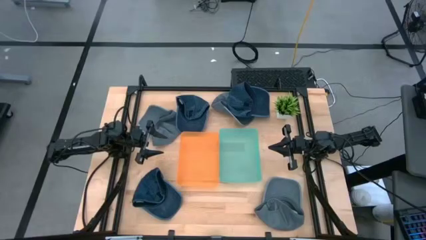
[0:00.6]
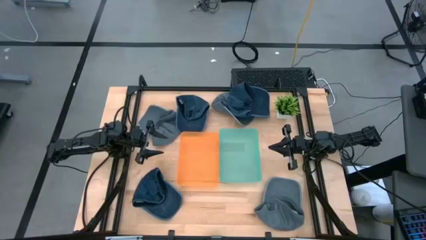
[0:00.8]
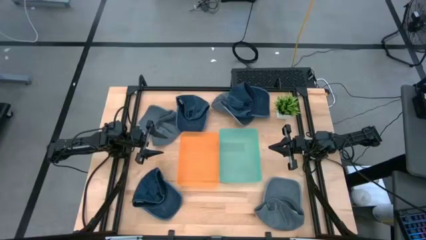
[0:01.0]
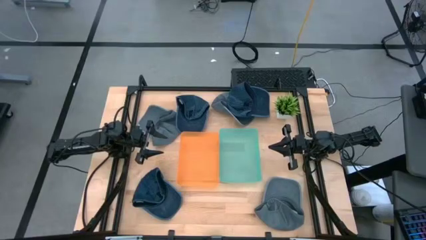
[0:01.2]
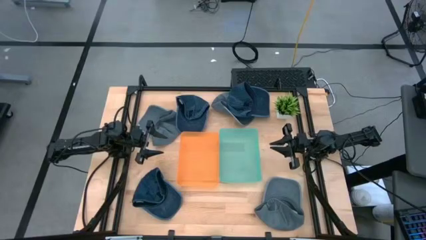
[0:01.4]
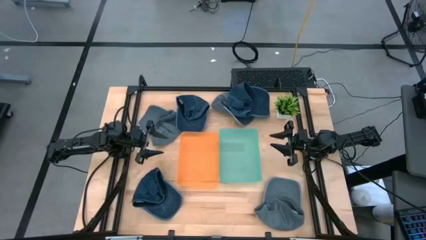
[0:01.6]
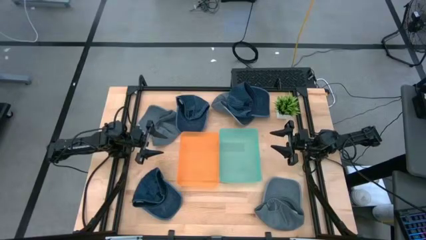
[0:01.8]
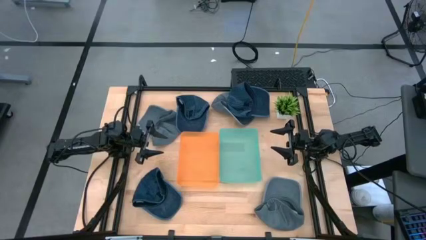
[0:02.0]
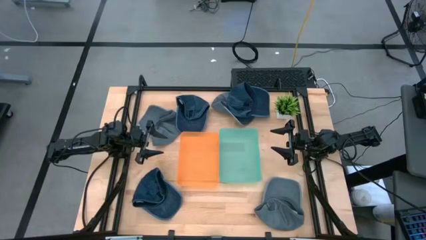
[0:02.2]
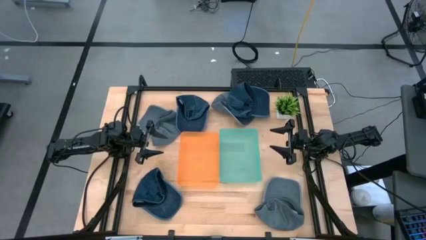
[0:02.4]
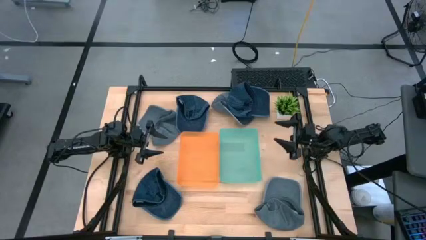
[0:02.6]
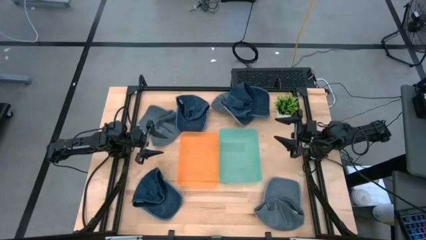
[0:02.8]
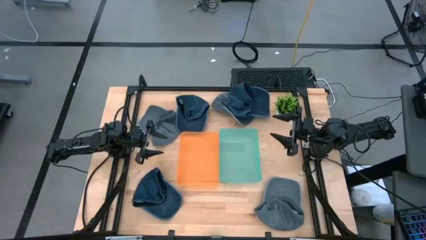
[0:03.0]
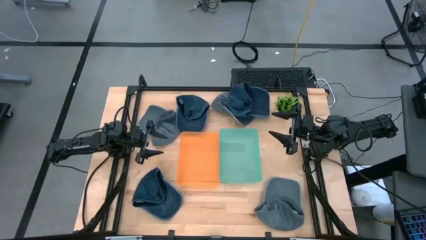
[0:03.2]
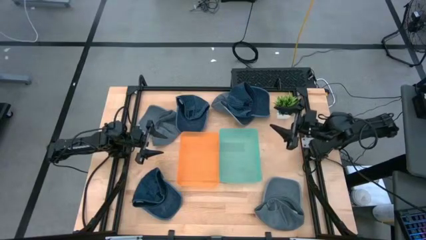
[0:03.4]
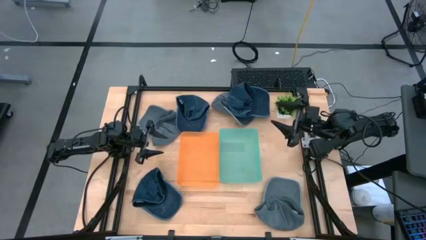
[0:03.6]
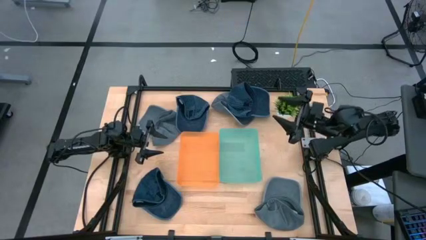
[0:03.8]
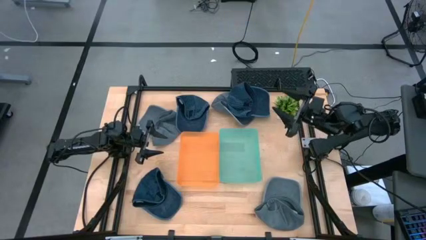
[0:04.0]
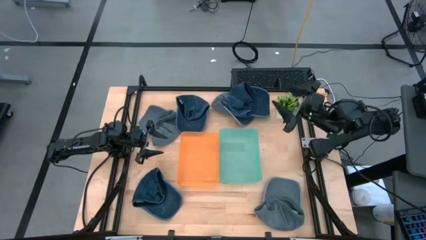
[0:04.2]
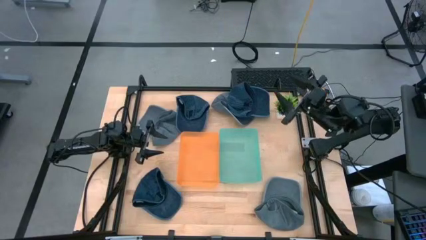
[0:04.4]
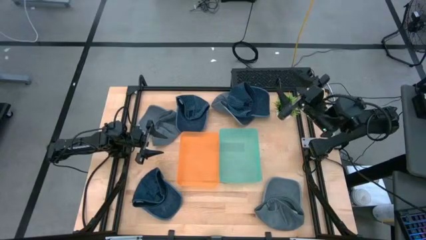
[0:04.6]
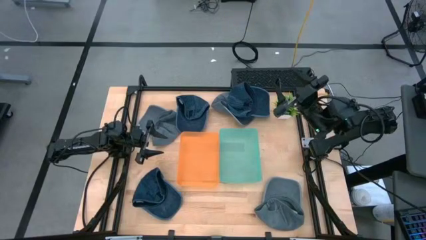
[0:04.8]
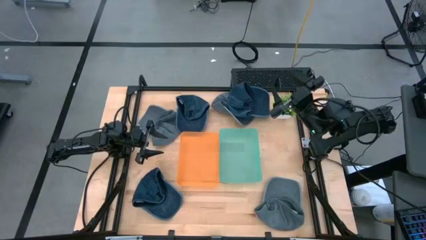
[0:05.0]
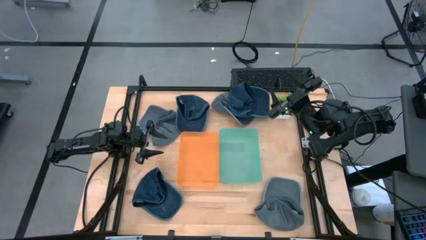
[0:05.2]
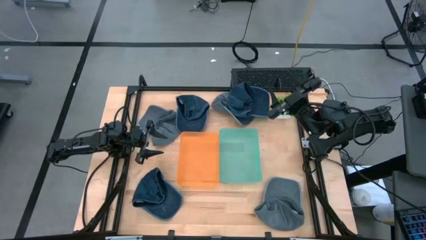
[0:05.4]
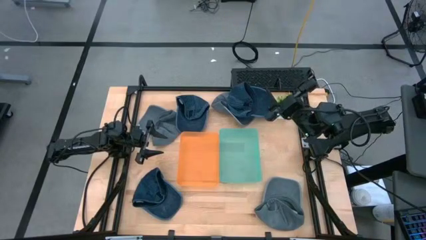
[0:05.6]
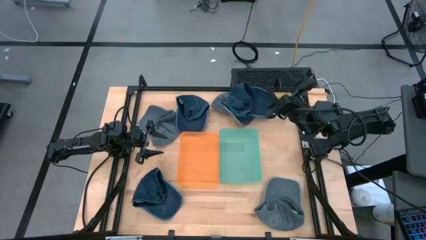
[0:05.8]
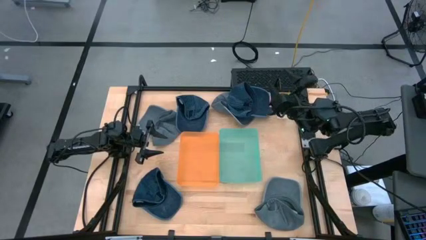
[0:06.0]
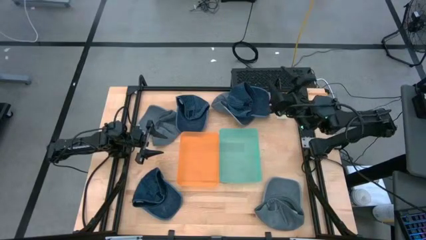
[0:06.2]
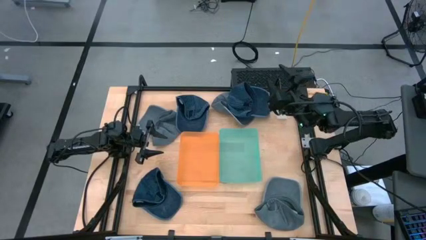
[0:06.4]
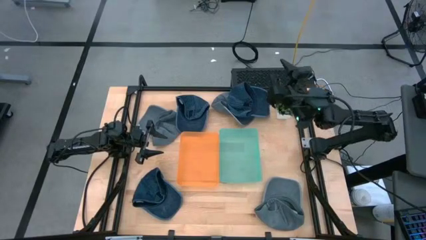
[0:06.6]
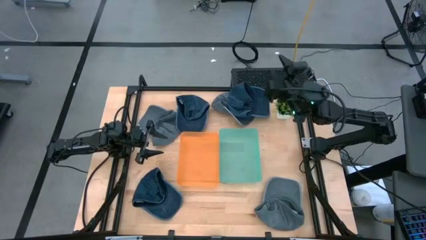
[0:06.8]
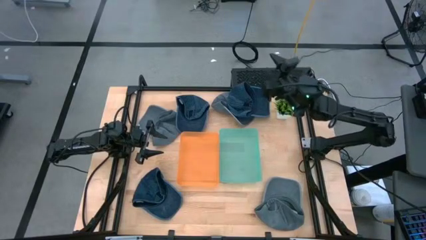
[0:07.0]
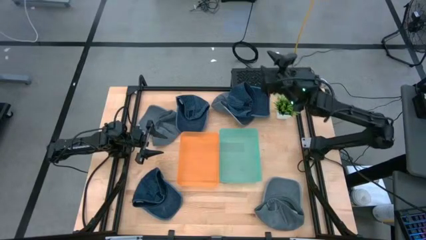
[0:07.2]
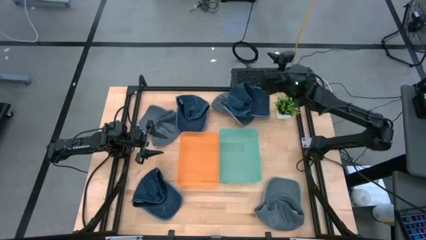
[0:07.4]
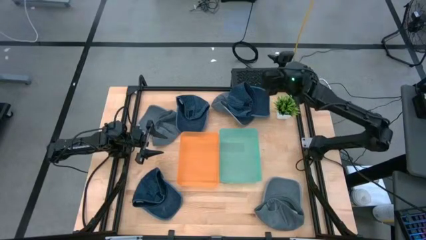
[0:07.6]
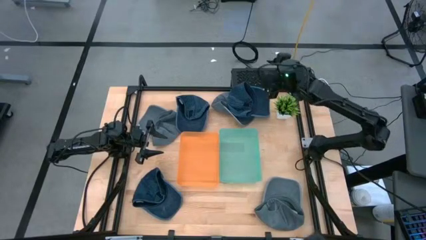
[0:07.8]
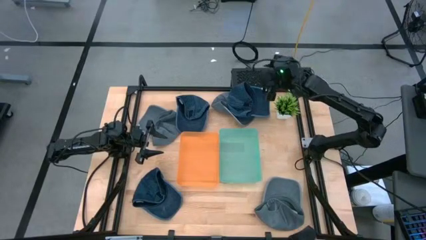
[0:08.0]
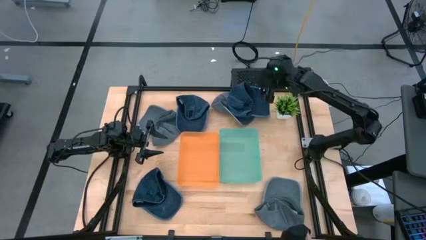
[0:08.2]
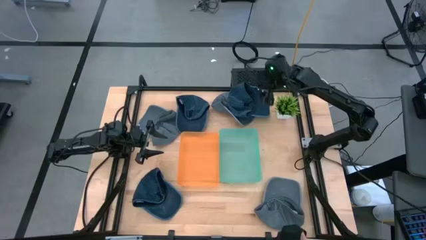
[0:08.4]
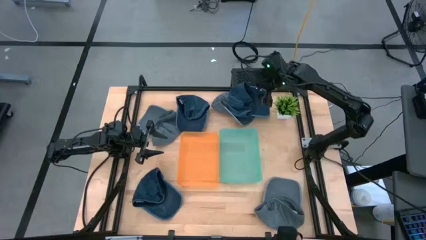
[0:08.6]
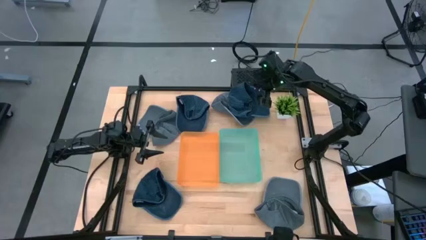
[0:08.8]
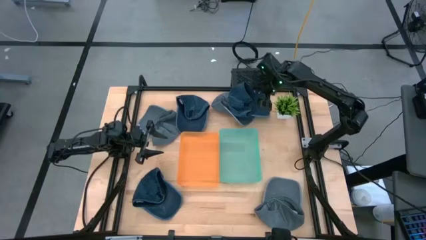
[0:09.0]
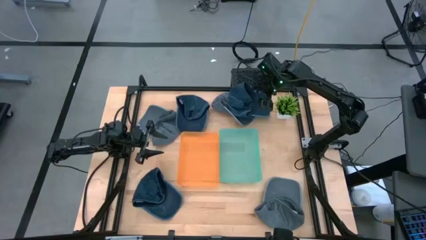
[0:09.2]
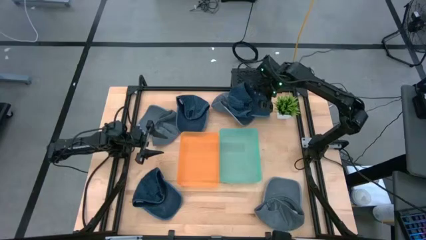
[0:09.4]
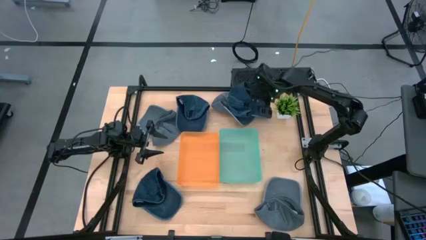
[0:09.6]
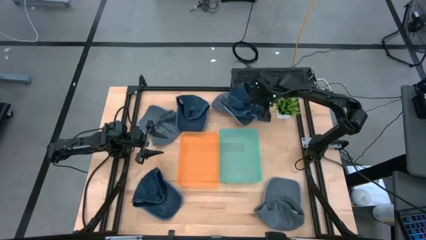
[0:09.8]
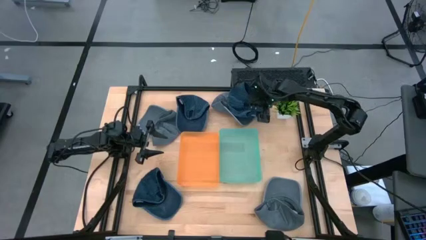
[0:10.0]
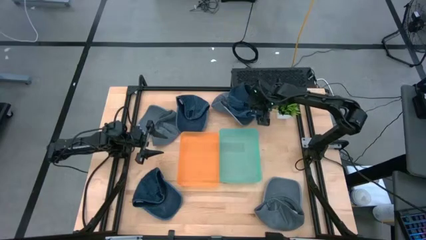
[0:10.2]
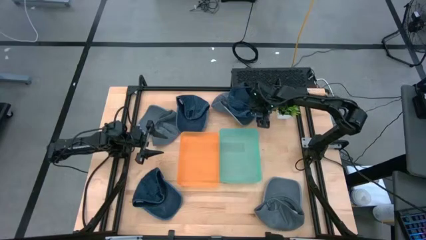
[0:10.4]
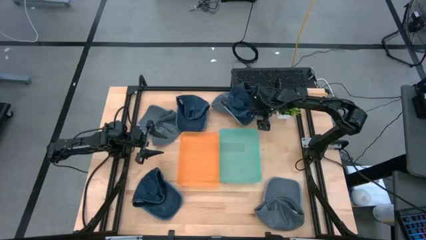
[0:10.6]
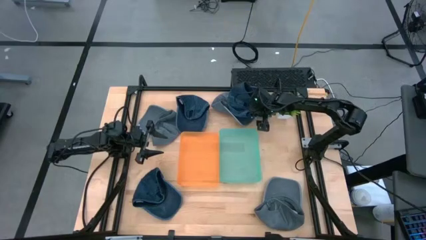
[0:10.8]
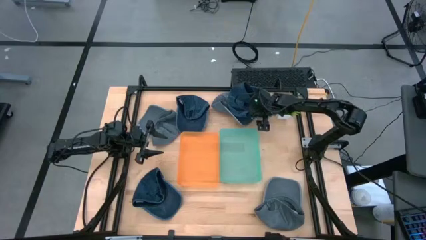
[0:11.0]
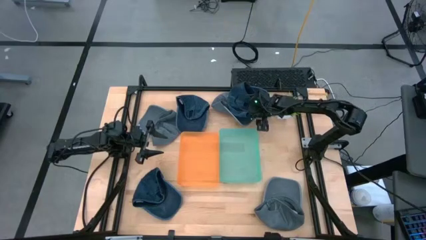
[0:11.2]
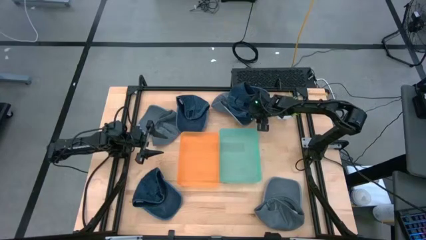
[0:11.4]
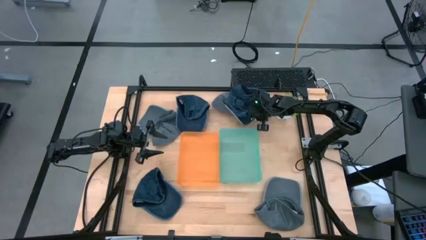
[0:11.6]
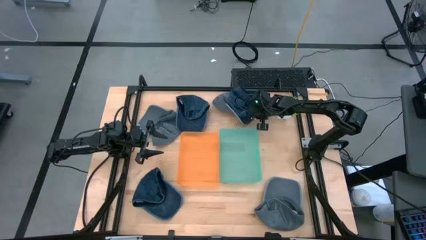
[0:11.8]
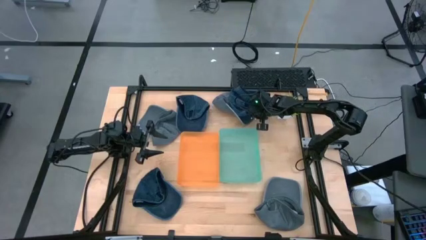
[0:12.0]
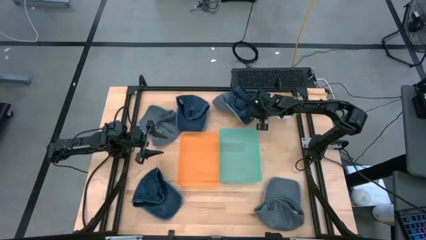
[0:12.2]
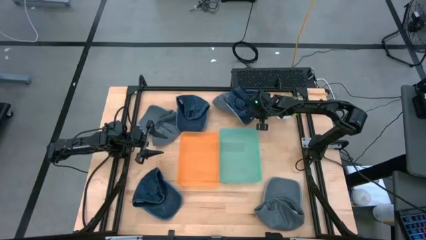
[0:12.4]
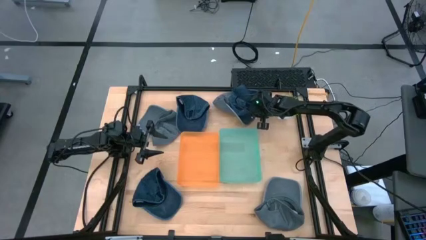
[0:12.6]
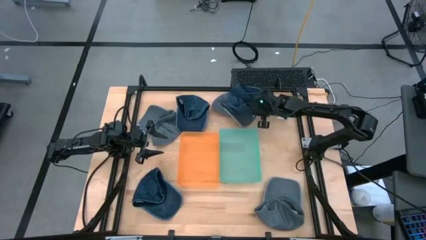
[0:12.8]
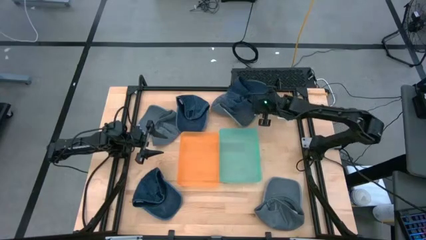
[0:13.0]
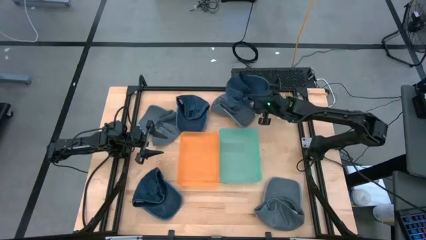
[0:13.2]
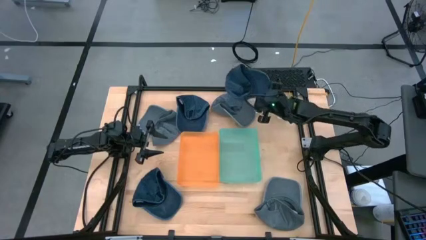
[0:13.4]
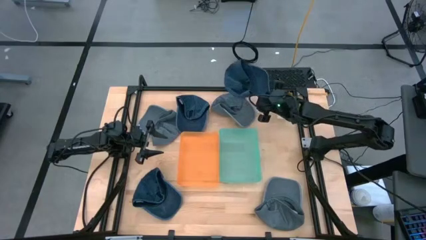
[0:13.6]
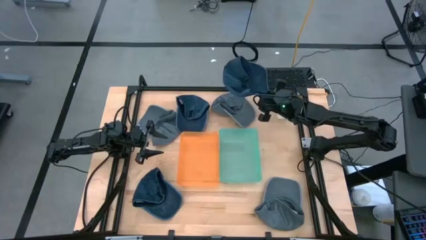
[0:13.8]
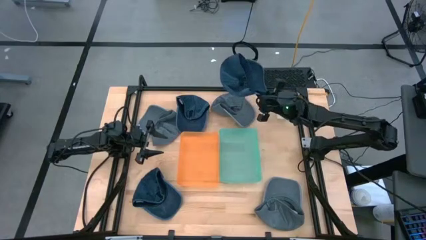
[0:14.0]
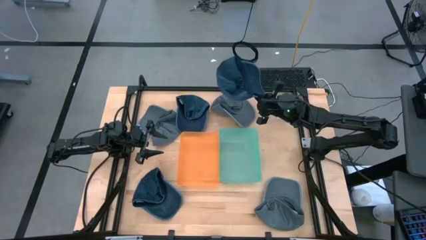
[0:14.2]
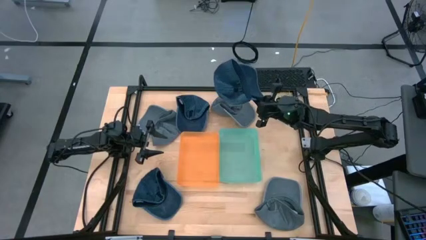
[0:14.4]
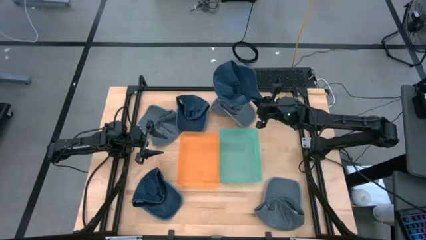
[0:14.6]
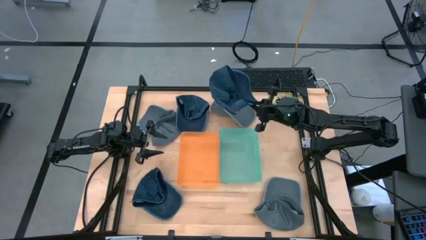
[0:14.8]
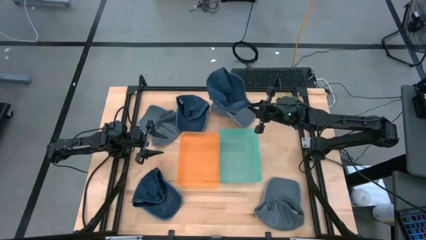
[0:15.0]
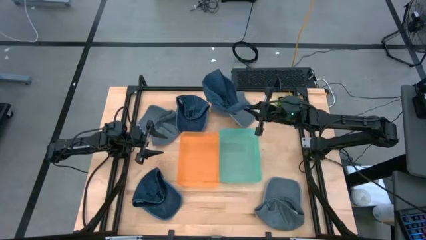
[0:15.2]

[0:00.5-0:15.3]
Task: Pick & Place hat
Put the top right blue cap into the orange bin
